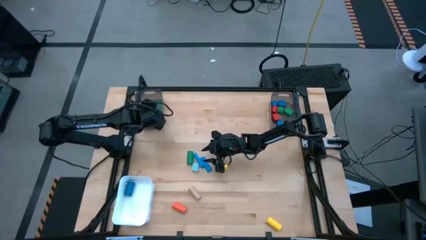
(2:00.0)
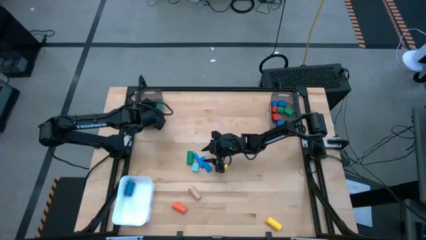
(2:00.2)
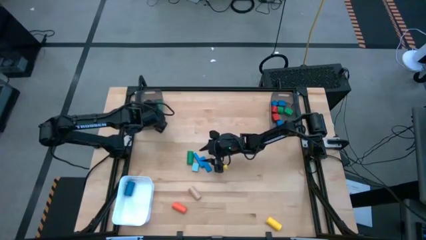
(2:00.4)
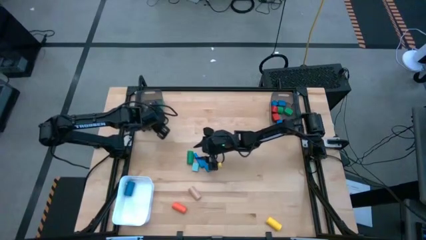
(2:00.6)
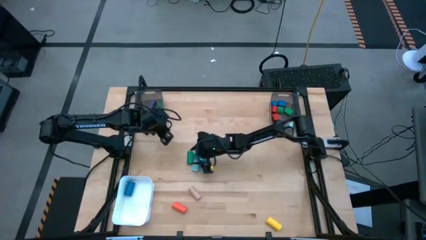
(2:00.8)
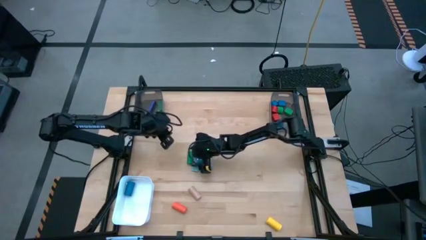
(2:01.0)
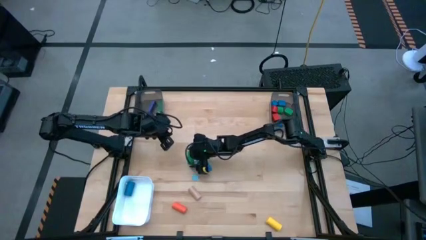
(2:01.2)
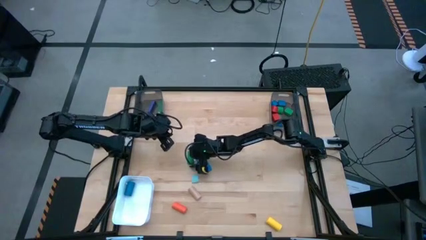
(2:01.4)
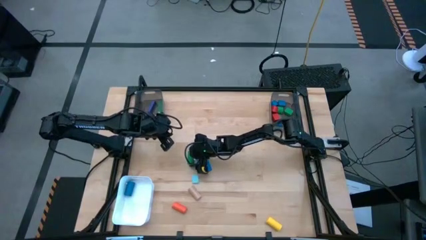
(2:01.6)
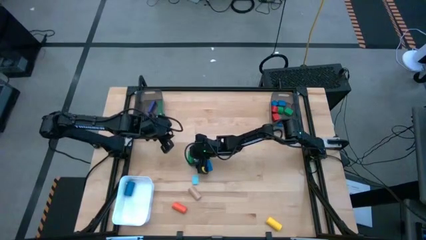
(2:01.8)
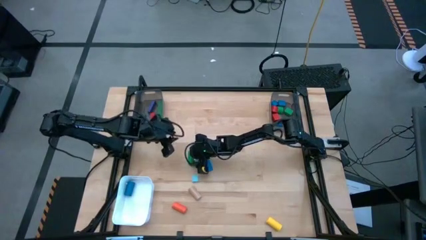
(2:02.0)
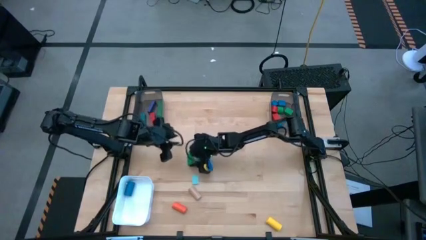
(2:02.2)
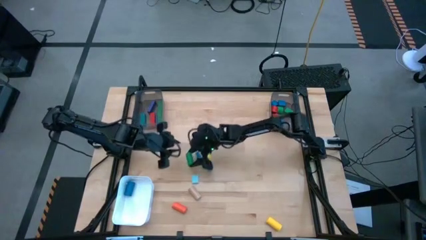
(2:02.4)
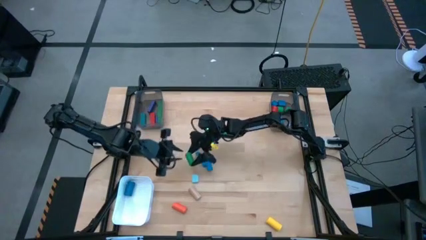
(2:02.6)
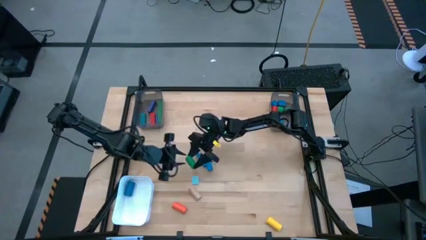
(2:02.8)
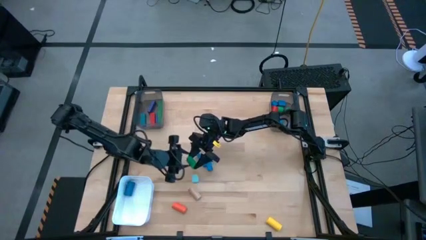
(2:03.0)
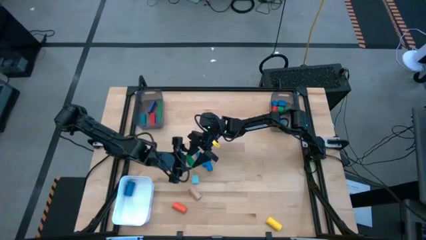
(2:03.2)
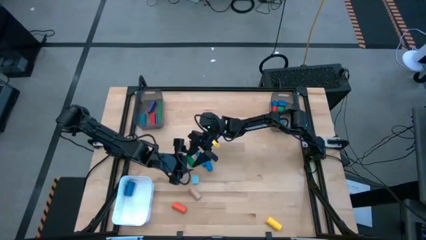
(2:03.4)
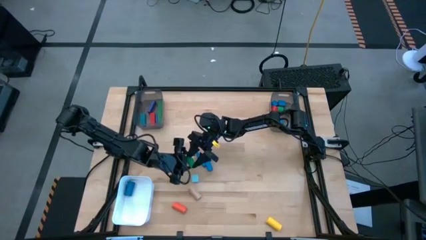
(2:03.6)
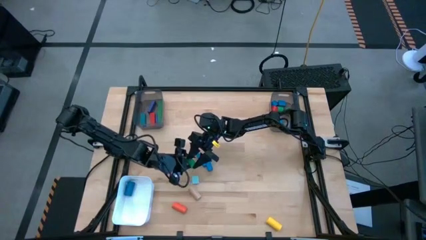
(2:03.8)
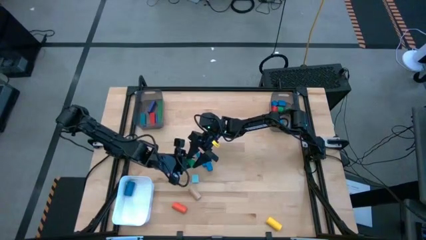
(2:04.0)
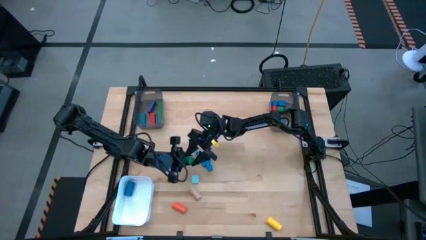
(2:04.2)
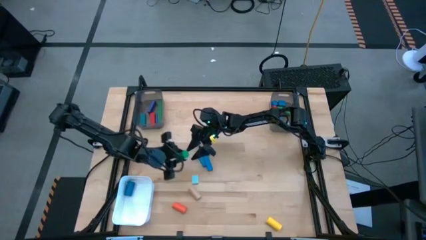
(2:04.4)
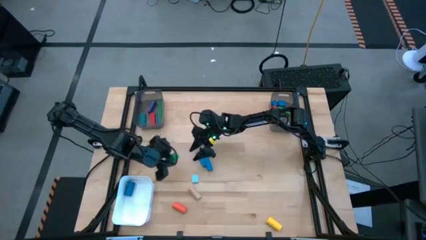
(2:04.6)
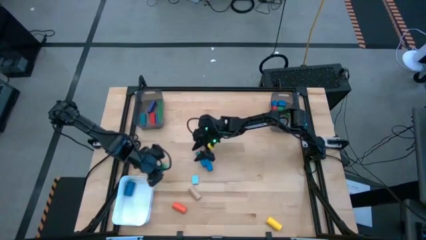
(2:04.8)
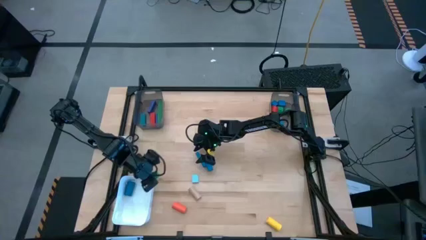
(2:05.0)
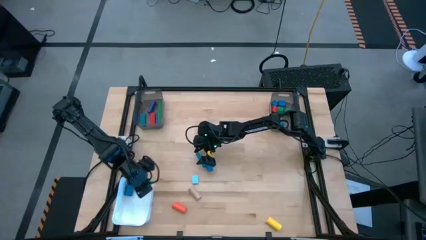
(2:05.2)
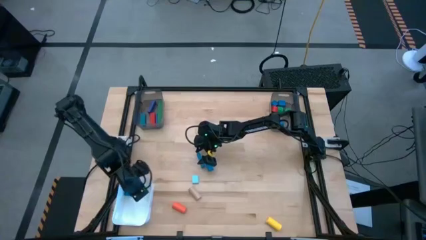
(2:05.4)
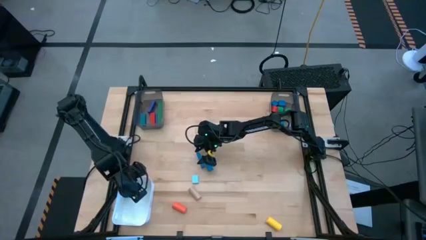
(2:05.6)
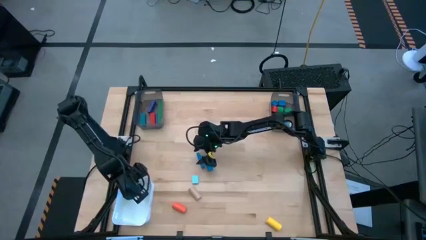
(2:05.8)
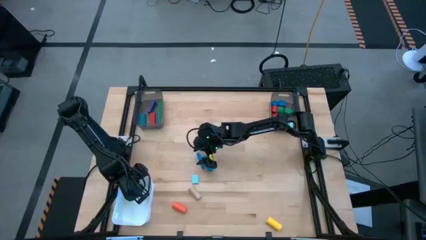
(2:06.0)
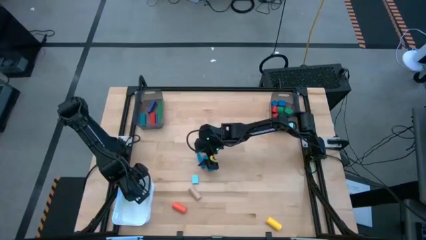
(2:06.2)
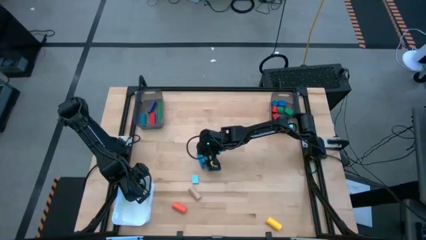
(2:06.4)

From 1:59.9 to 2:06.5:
Task: Sort blocks by size
Put the green cylindrical block into the white bin

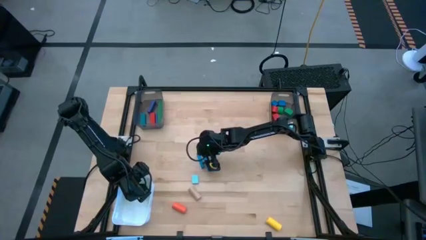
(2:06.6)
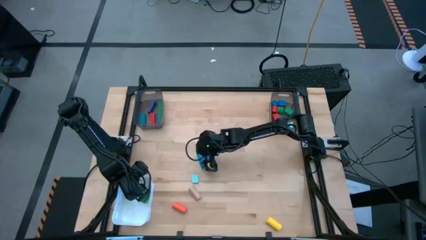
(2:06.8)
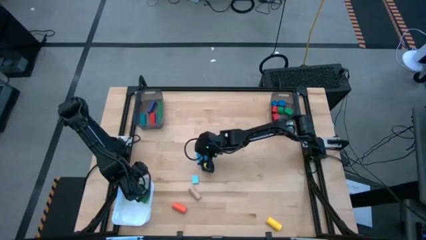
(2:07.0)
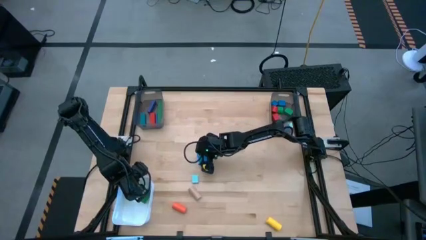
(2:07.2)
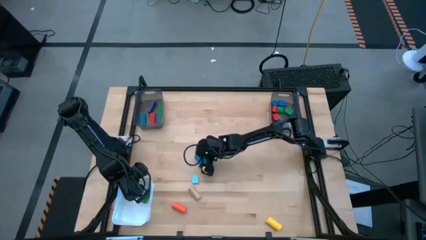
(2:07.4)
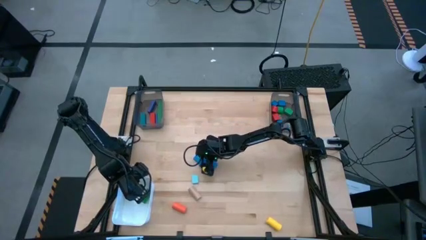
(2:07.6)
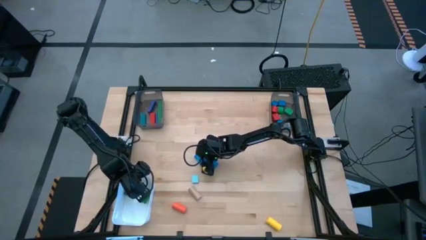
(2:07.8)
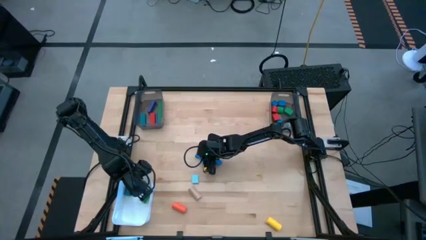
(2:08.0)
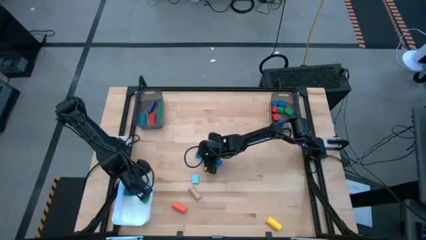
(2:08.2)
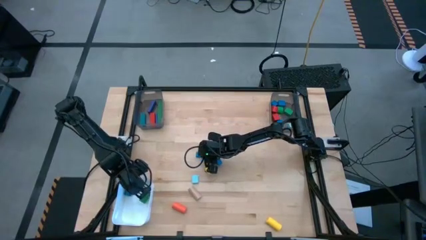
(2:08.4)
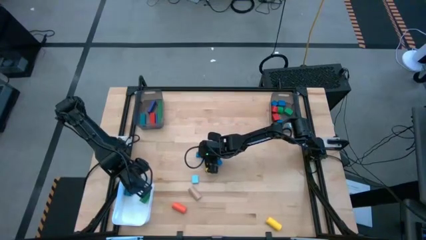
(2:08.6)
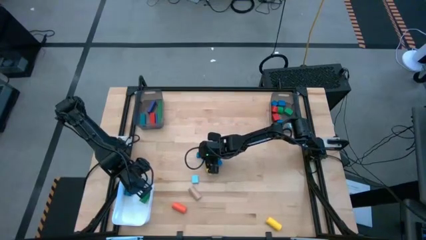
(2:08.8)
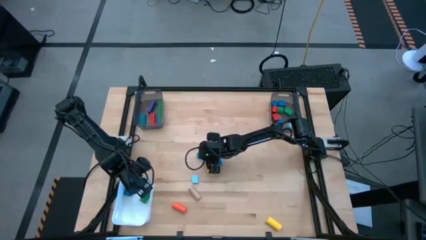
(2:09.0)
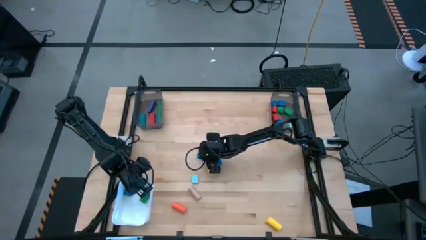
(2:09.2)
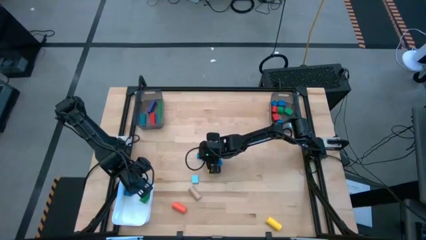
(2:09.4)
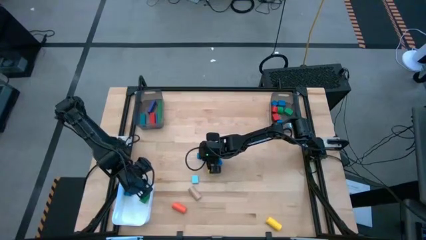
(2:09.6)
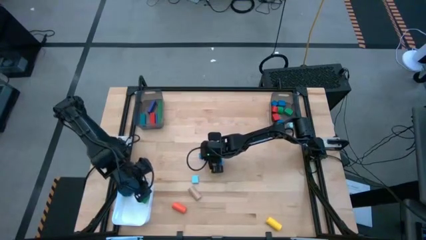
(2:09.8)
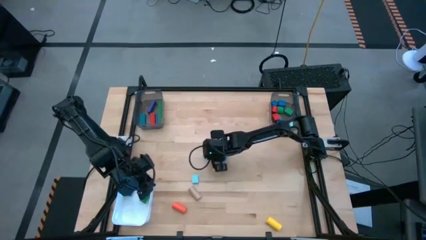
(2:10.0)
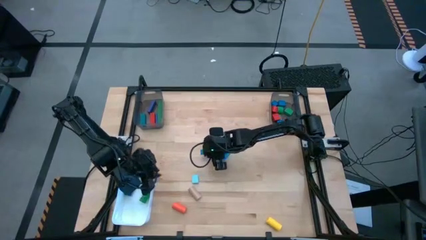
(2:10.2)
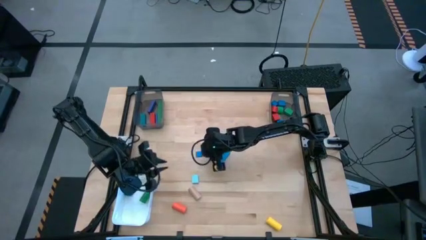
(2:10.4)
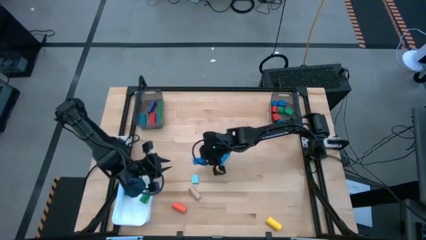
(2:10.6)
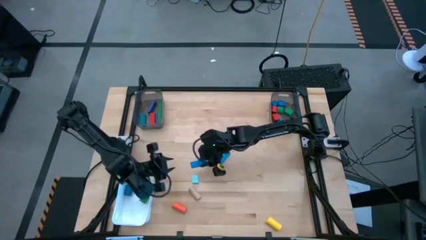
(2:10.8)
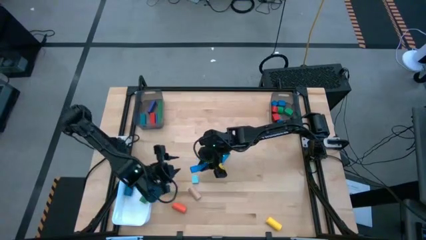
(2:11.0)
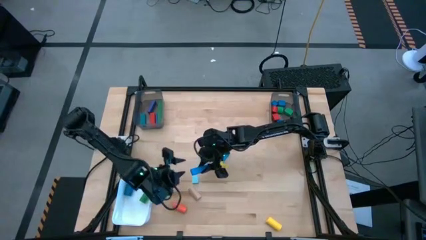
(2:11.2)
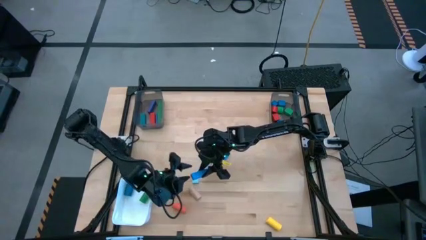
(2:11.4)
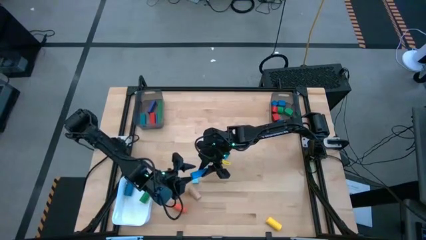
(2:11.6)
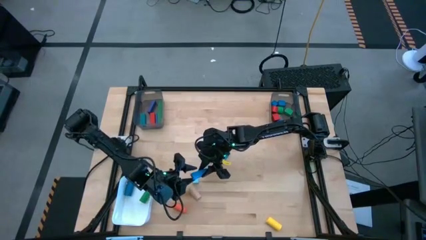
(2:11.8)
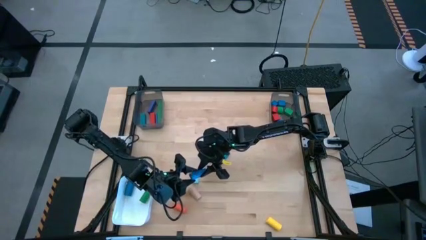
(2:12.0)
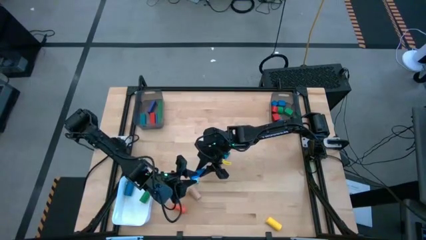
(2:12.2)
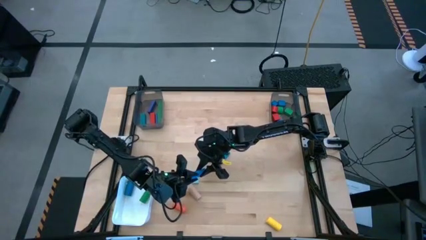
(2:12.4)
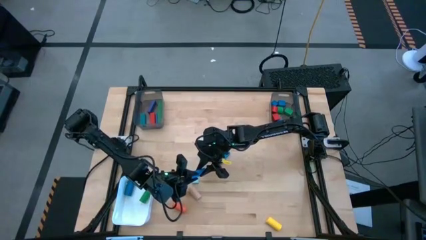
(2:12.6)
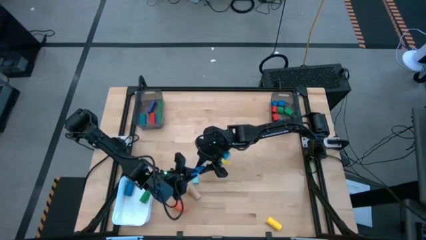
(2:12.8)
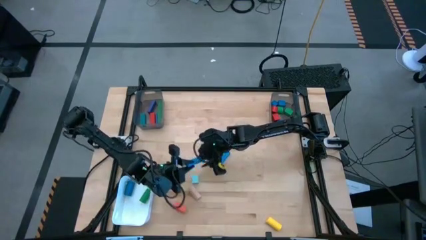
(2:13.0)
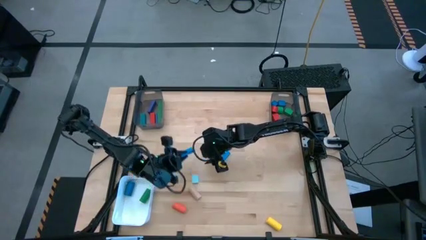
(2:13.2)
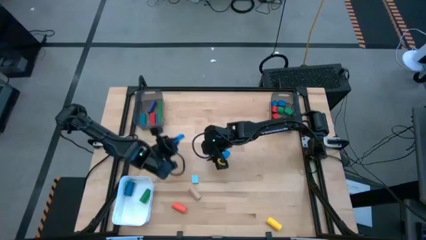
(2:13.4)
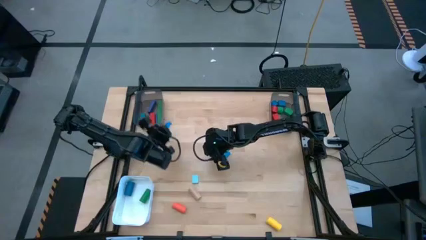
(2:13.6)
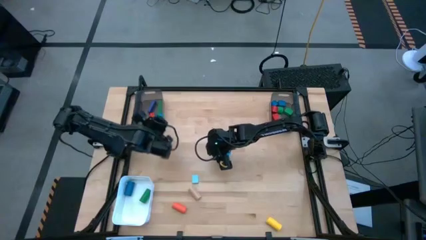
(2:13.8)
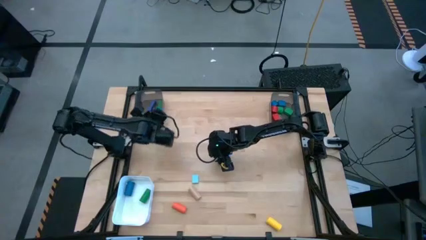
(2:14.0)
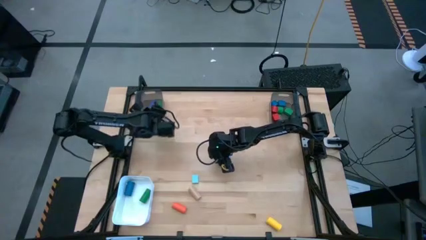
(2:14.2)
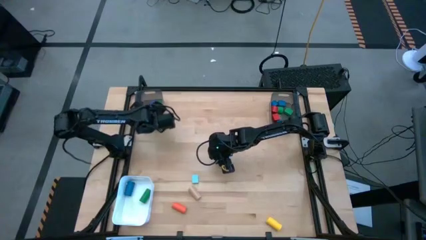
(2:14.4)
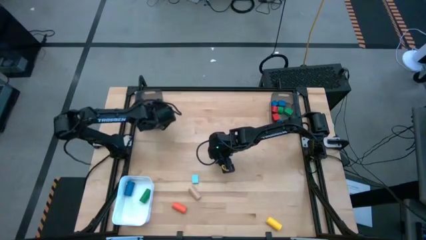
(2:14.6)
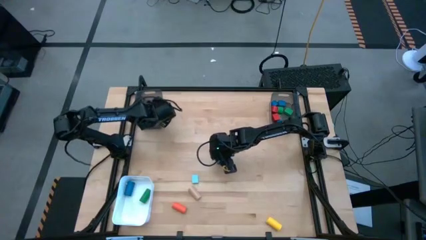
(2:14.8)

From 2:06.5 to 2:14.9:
Put the blue rectangular block into the left black bin

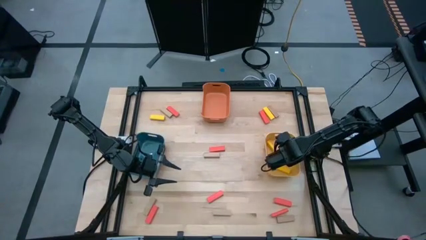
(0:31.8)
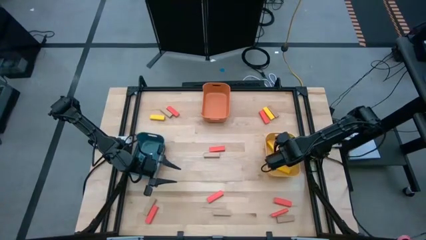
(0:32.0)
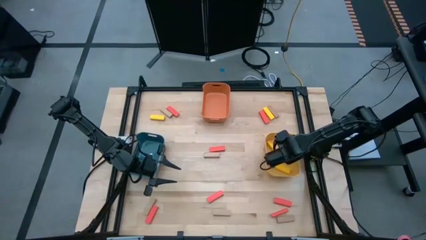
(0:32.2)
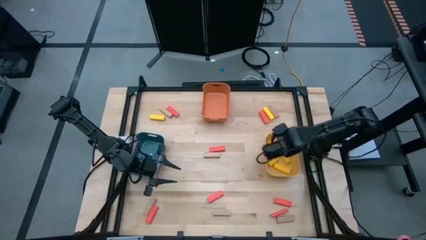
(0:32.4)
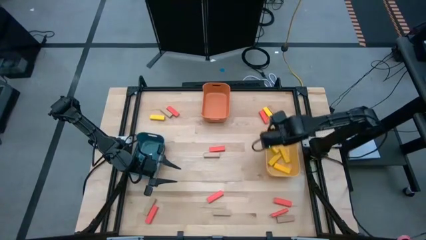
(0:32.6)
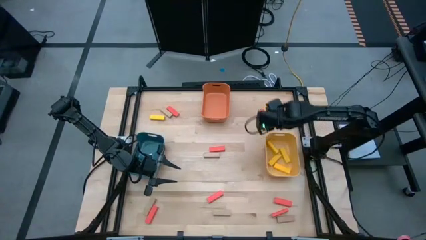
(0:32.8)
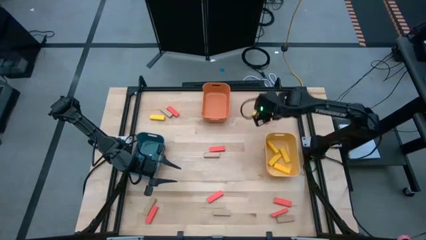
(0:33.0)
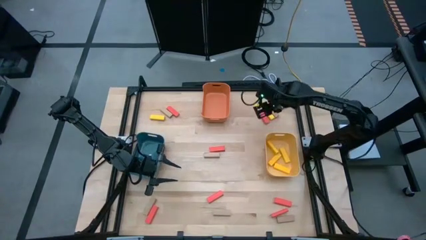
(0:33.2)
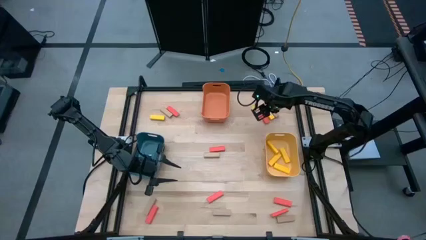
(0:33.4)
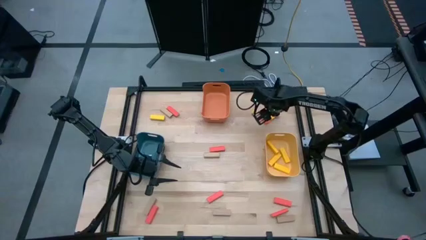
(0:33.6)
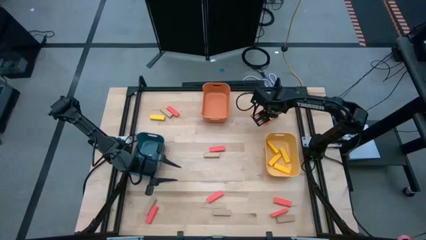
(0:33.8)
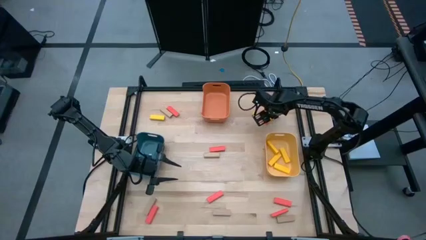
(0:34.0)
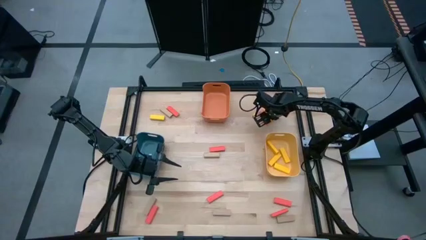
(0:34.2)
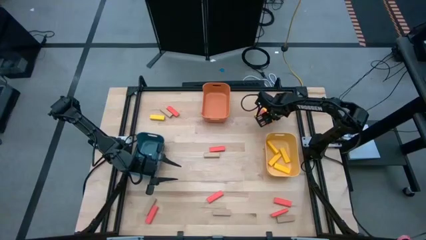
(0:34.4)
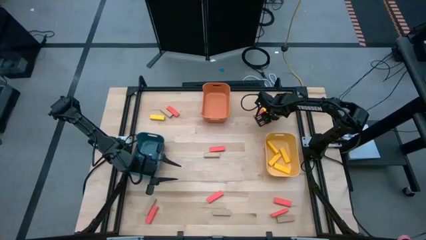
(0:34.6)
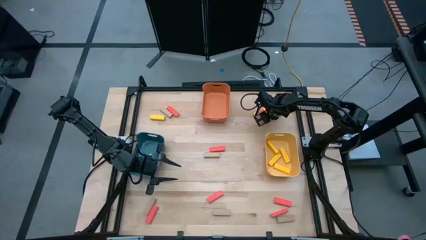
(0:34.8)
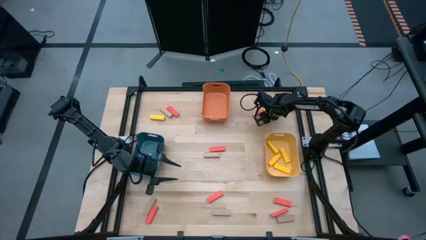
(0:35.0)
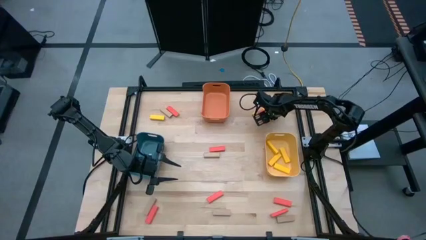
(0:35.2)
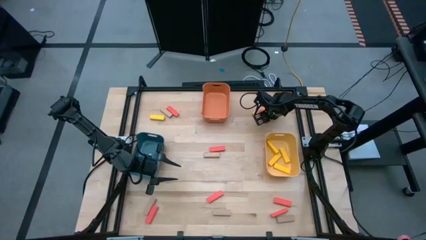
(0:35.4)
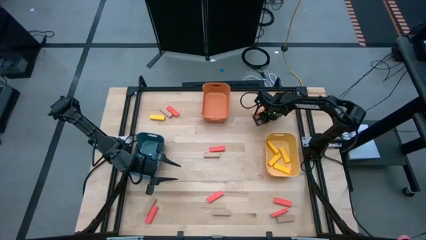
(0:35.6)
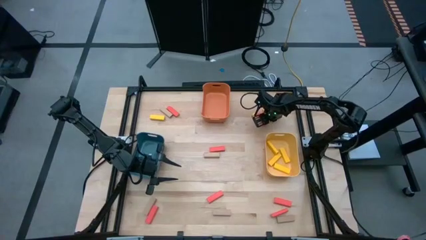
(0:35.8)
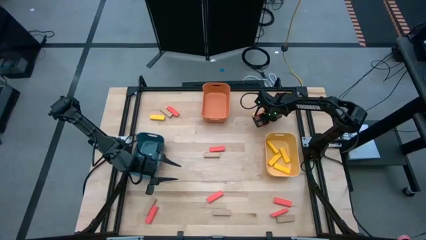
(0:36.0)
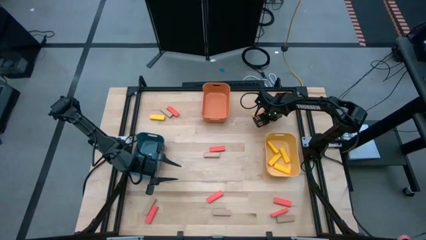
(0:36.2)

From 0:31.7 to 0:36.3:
Task: Sort blocks
Adjust the top right orange block
